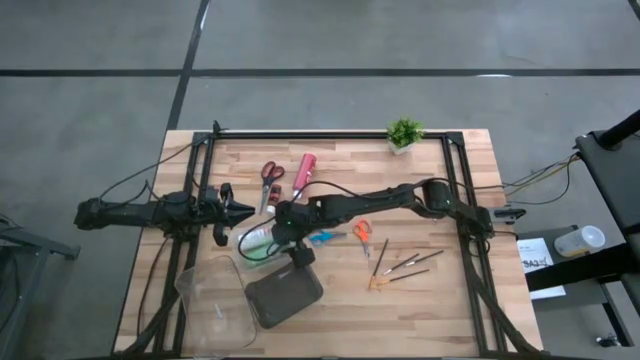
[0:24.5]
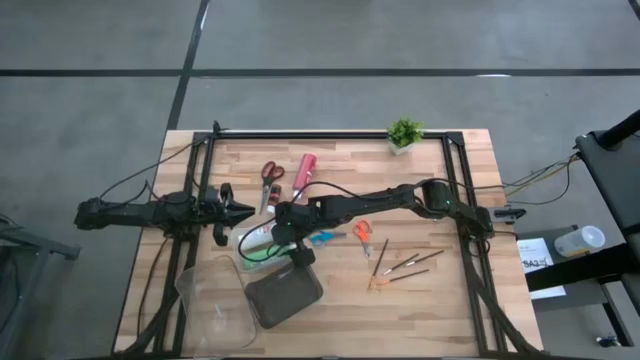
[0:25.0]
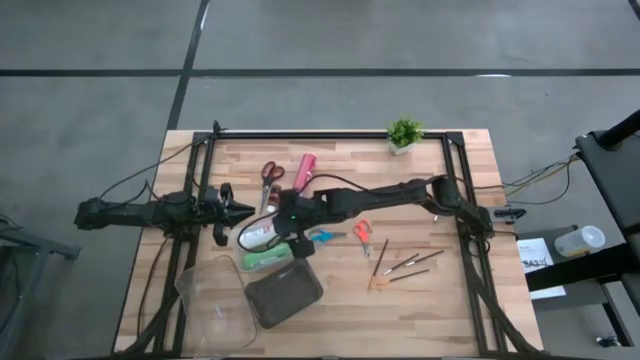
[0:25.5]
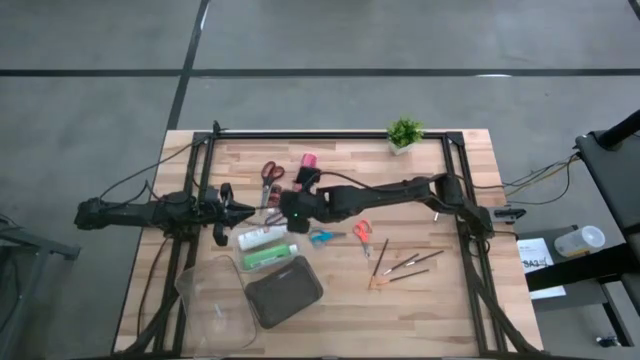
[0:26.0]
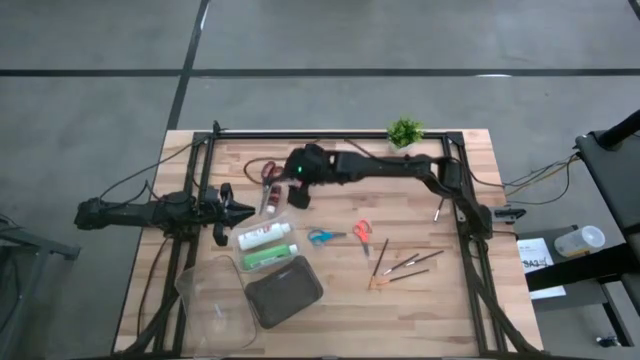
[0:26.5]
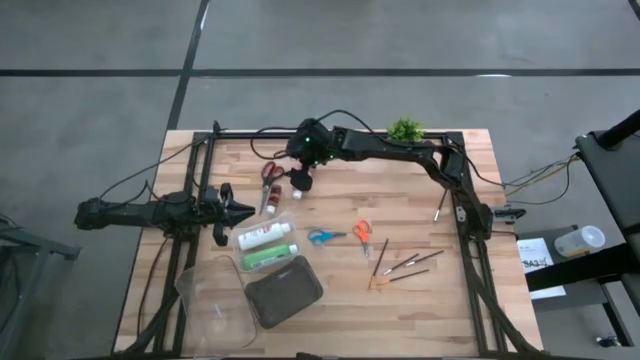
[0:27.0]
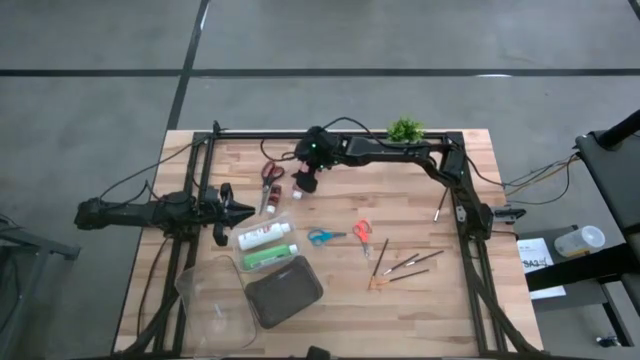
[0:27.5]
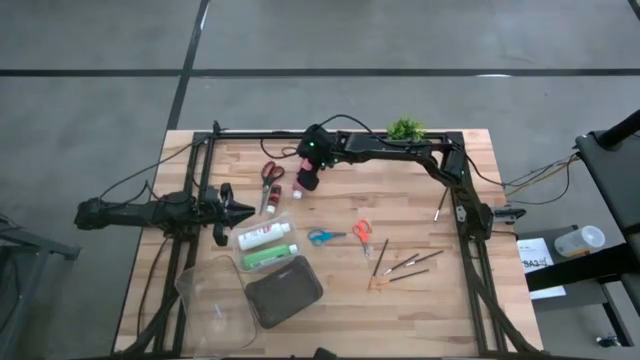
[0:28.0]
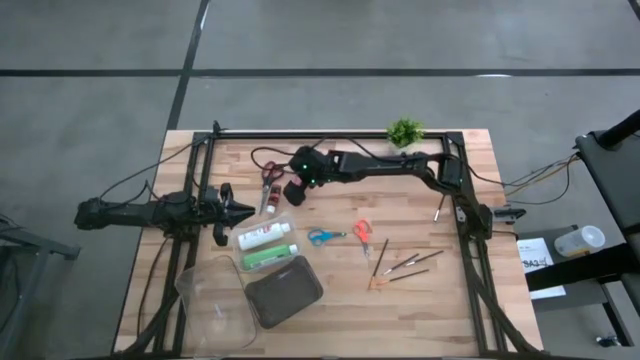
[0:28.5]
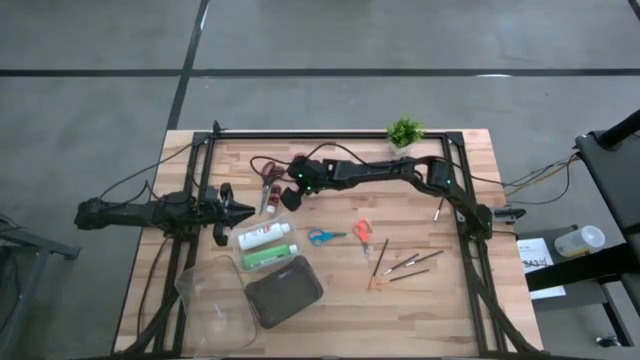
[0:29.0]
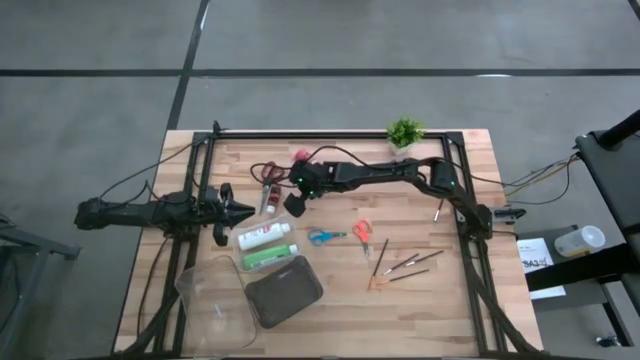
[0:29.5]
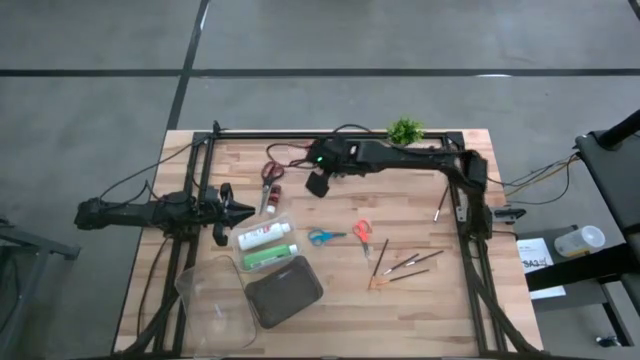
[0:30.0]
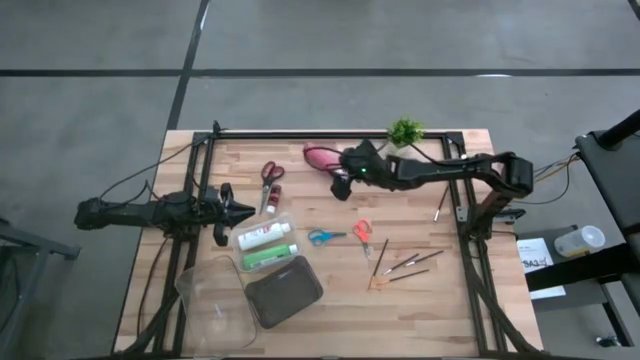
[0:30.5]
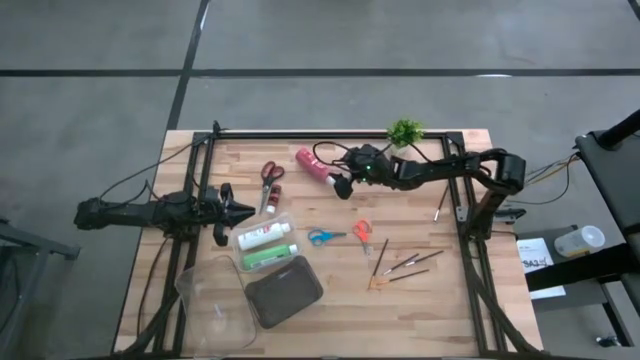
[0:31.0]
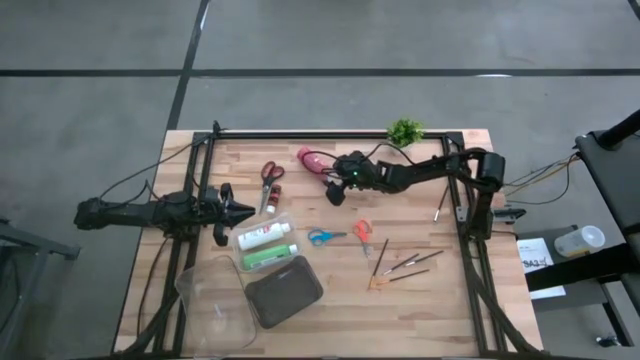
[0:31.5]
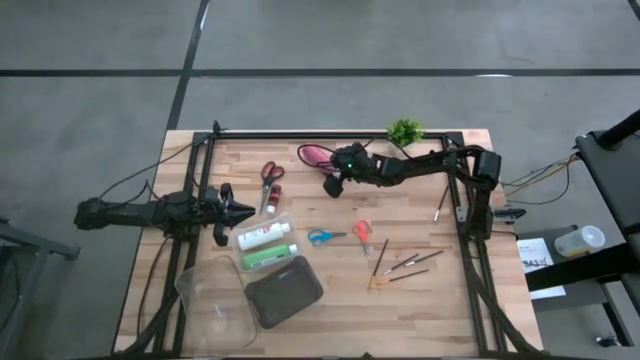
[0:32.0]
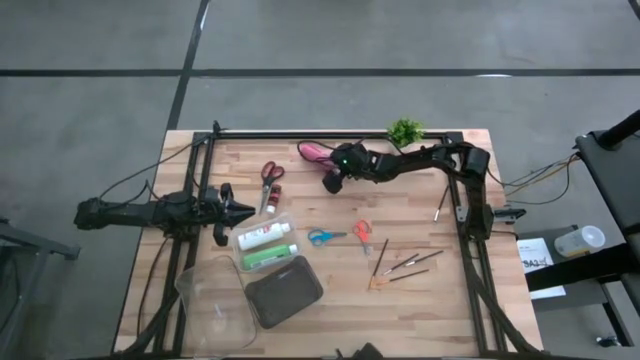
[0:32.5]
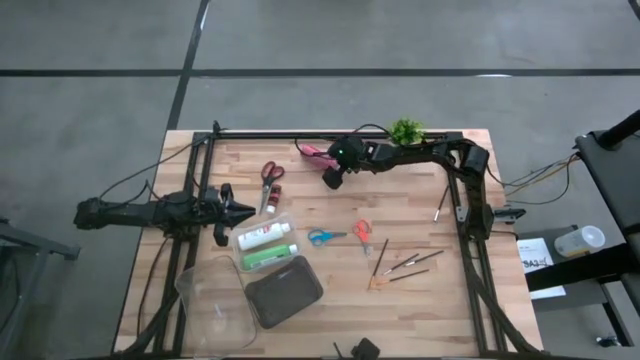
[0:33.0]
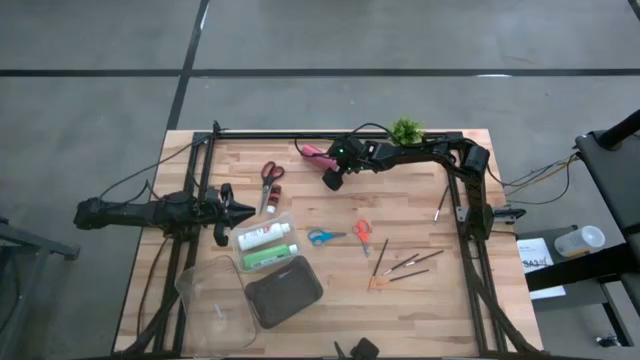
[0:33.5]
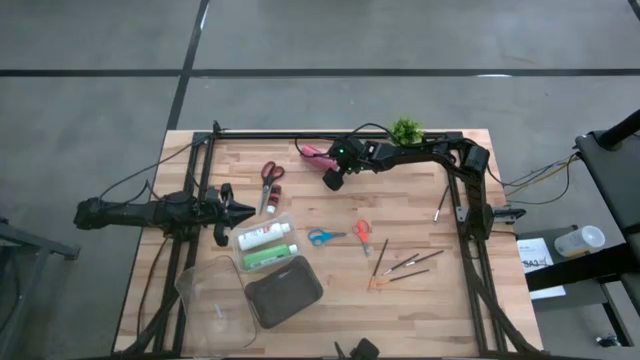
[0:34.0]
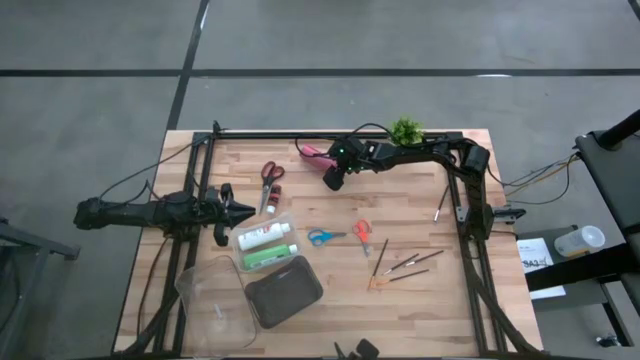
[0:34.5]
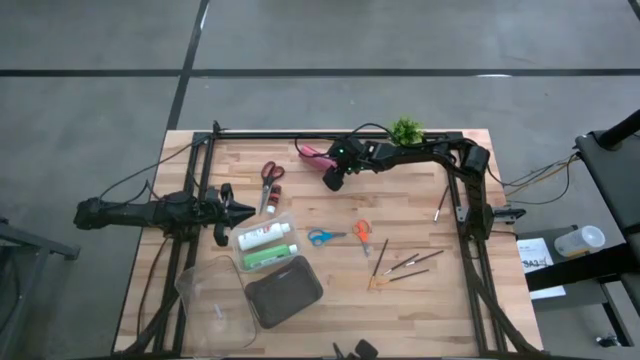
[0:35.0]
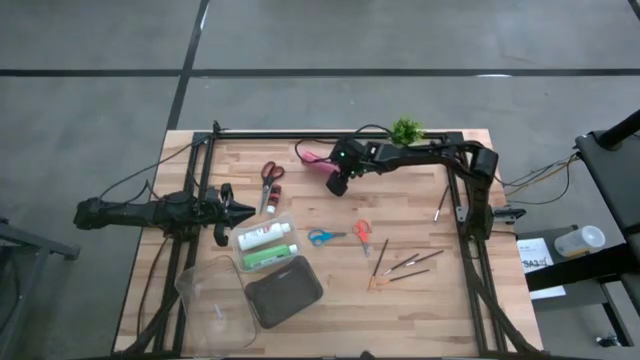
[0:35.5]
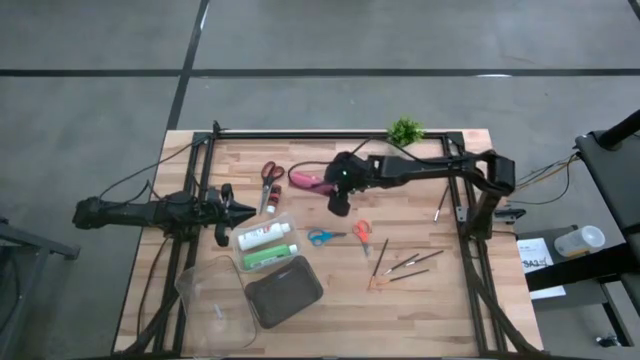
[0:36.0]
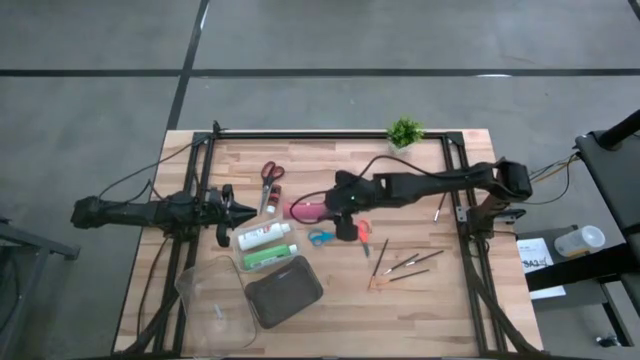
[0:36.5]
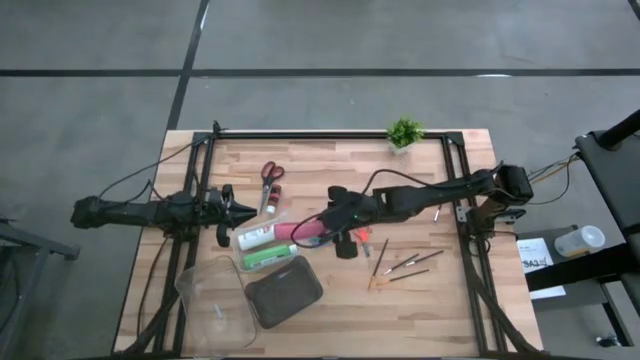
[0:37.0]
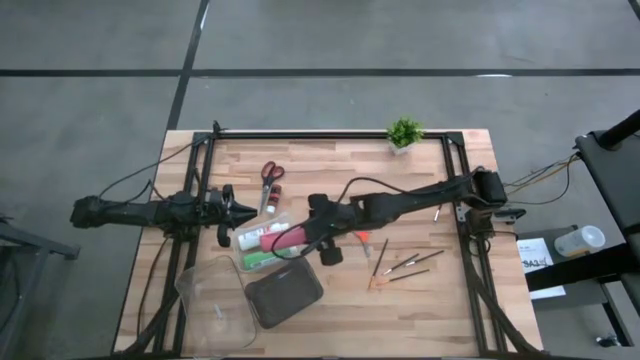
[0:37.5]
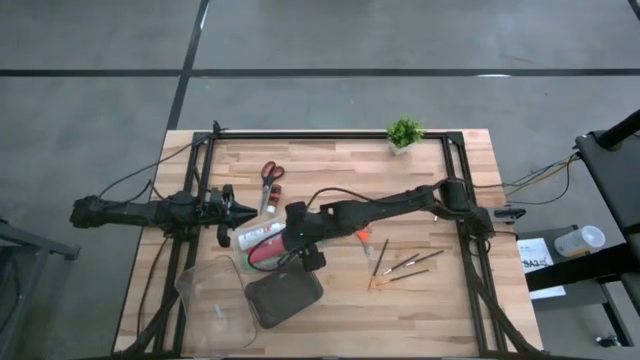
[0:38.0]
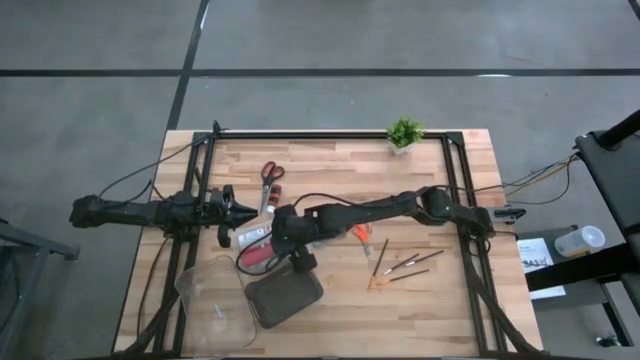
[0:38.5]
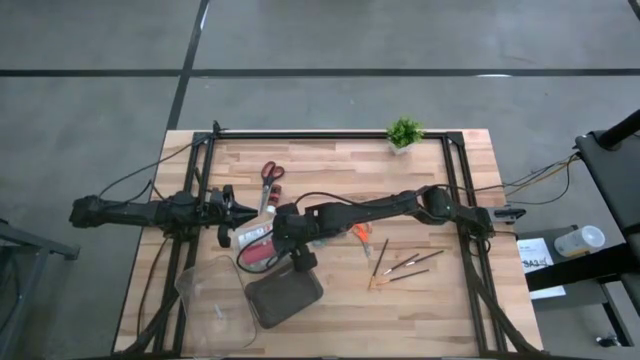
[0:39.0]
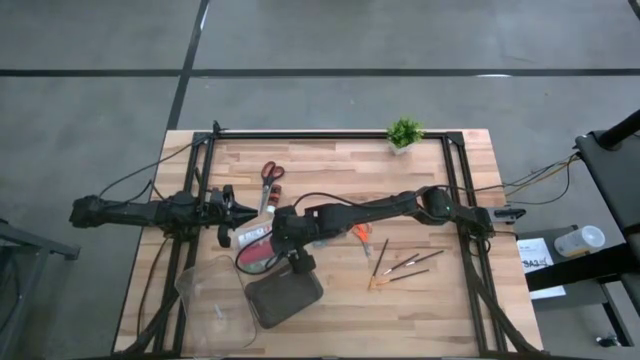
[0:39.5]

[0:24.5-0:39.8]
Task: Pick & Place Paint Supplies
Put the pink paint bottle into the top transparent bin

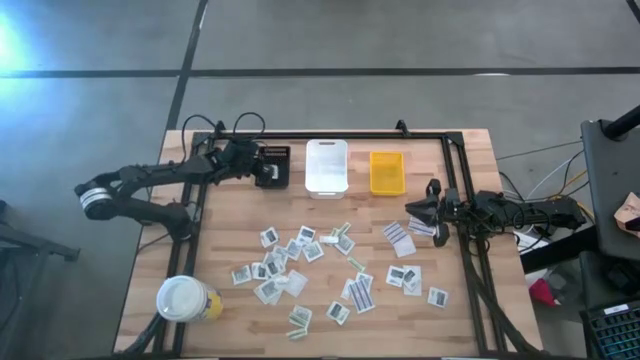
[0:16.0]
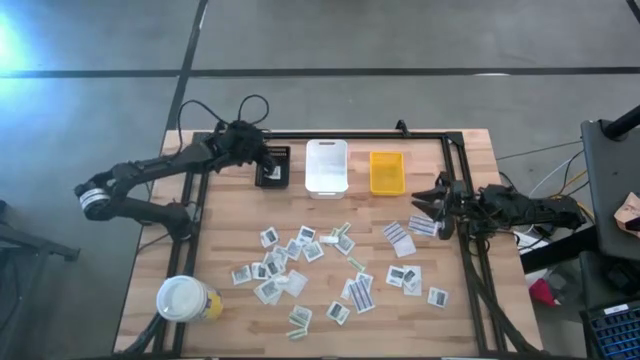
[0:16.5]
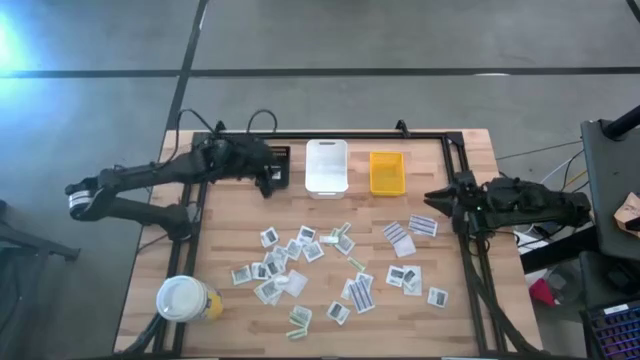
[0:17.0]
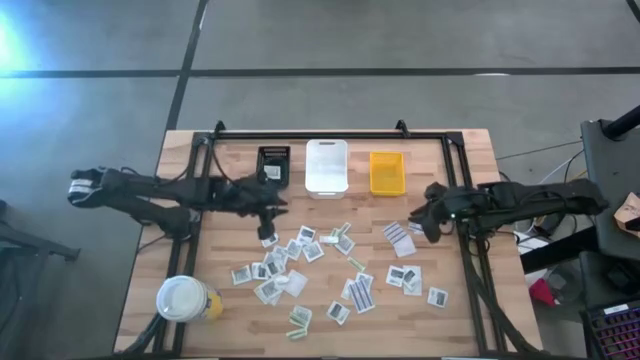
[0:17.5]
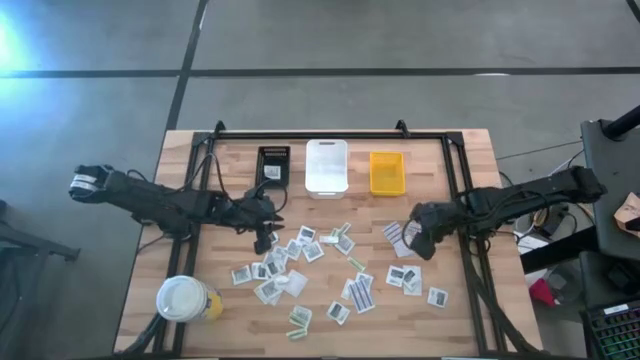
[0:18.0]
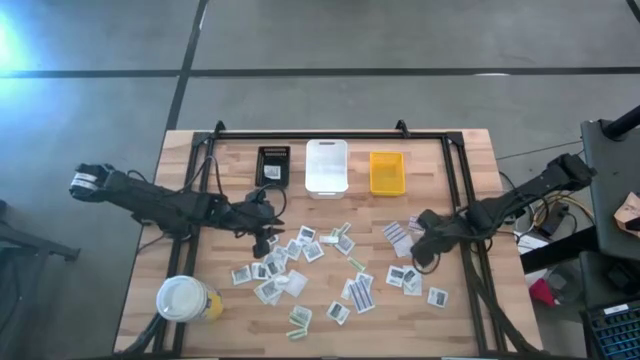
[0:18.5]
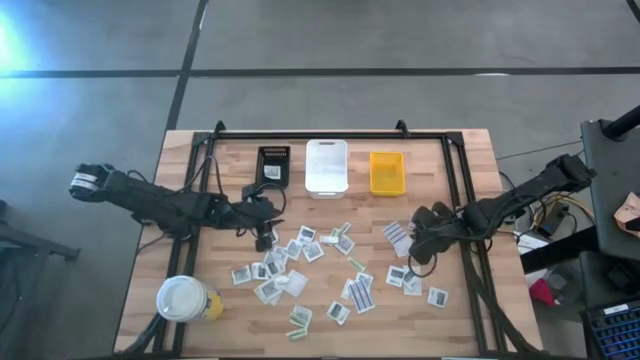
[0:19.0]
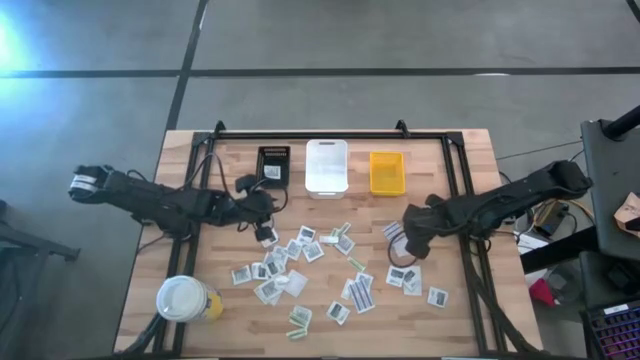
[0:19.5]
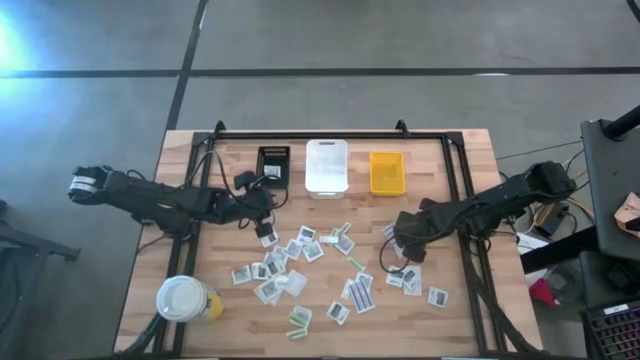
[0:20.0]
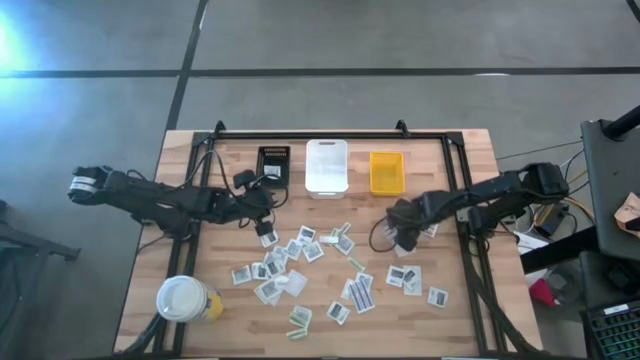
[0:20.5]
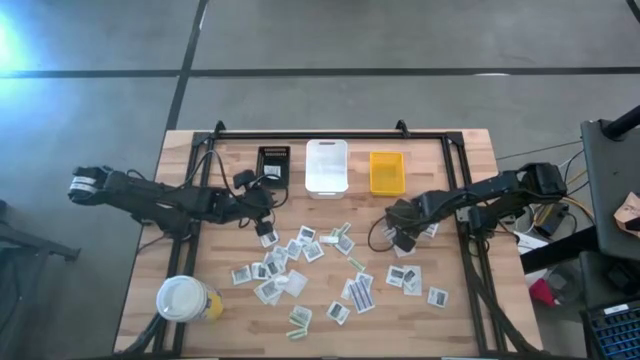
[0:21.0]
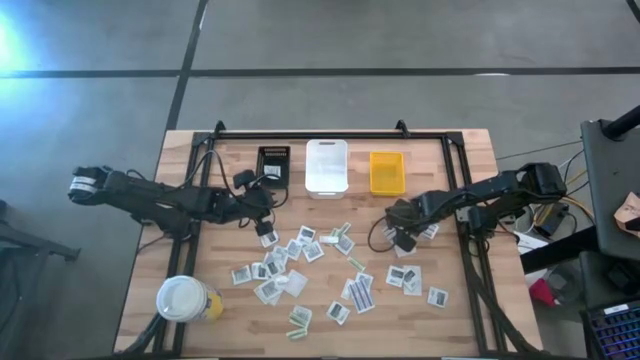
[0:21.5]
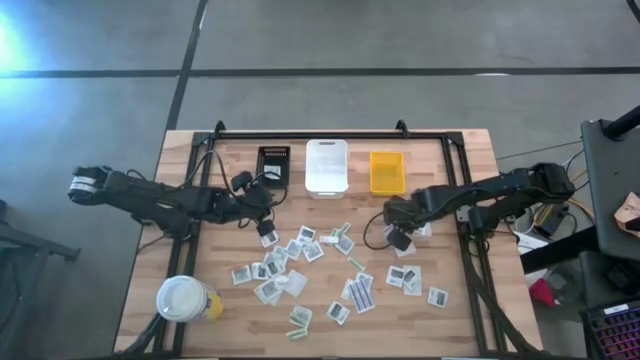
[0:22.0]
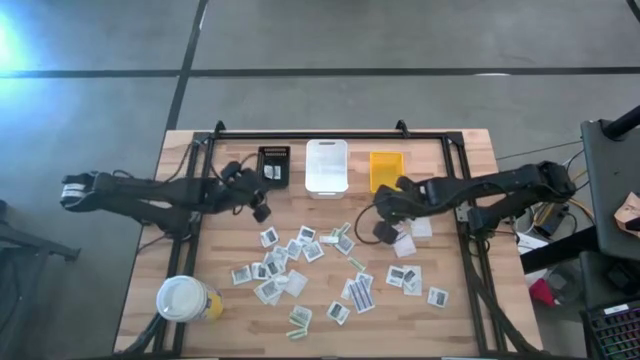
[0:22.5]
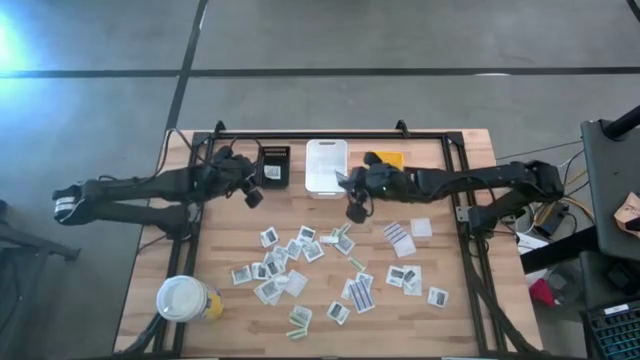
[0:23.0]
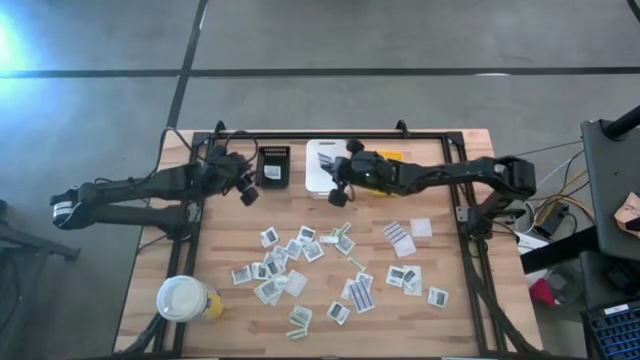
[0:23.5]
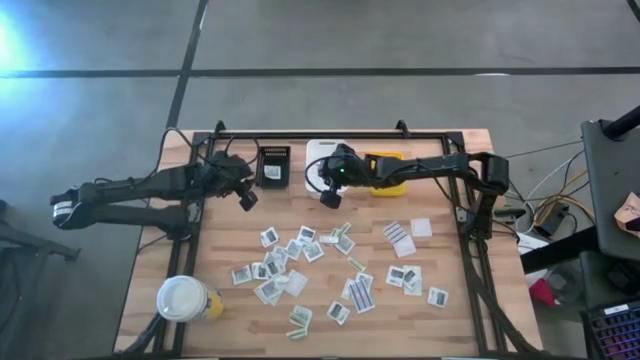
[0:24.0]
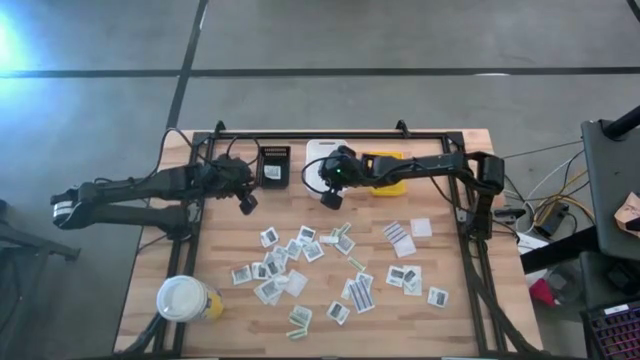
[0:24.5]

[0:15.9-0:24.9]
Task: Pick & Place First Aid Supplies
Put the blue bandage into the white bin
